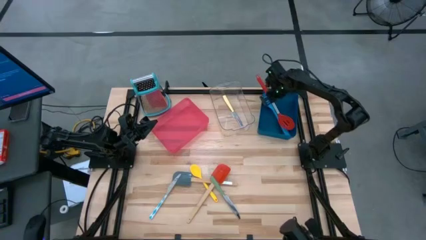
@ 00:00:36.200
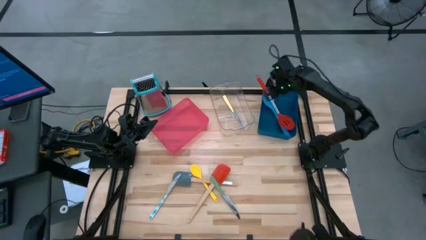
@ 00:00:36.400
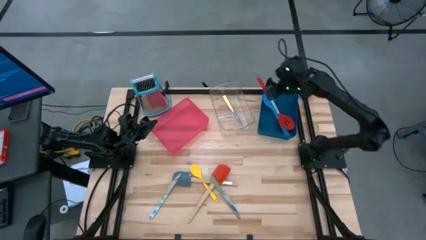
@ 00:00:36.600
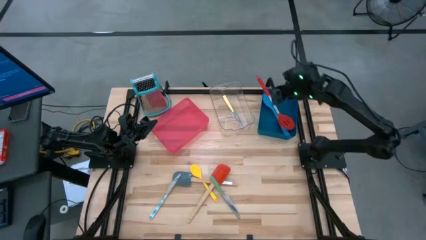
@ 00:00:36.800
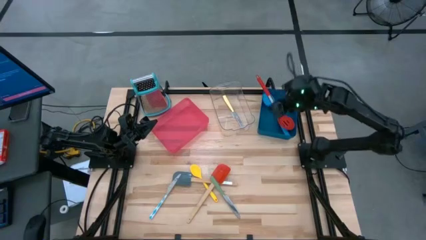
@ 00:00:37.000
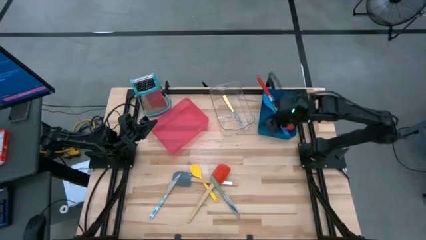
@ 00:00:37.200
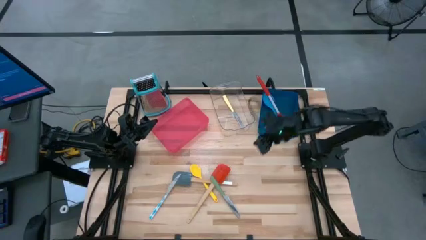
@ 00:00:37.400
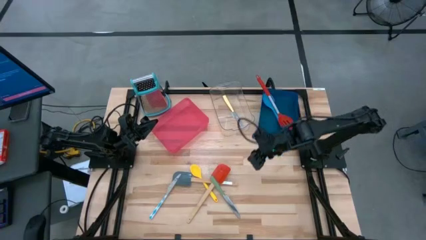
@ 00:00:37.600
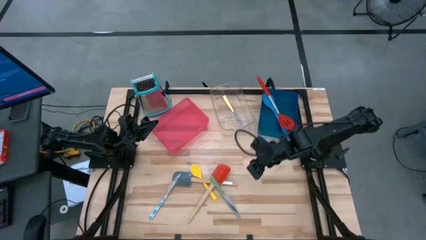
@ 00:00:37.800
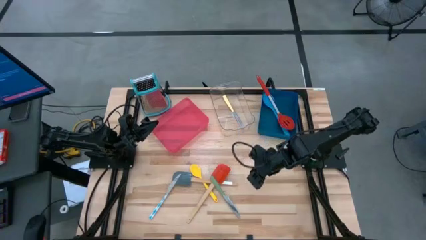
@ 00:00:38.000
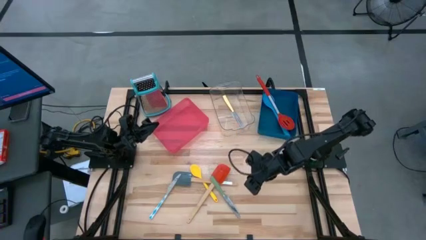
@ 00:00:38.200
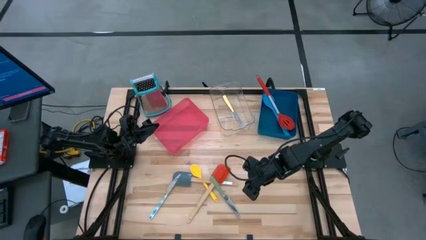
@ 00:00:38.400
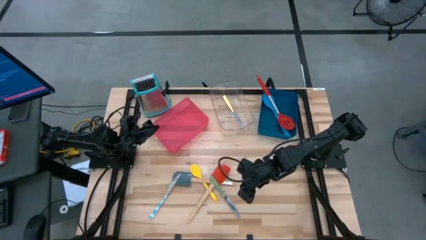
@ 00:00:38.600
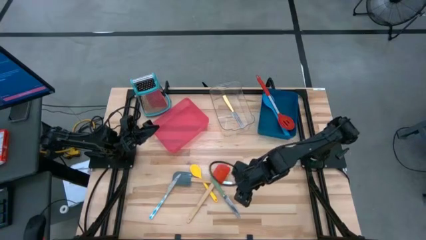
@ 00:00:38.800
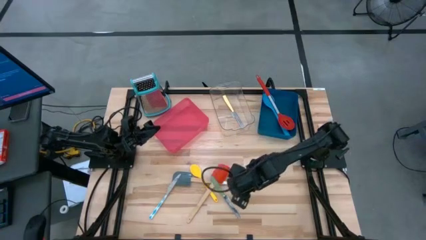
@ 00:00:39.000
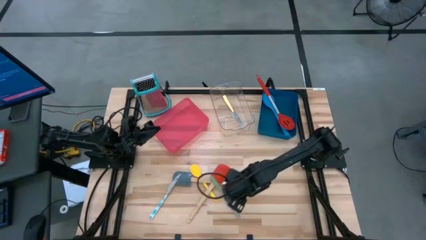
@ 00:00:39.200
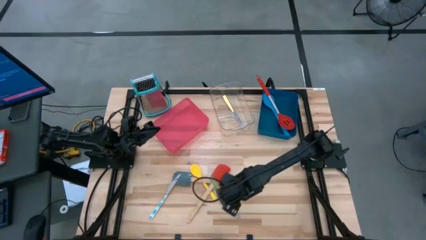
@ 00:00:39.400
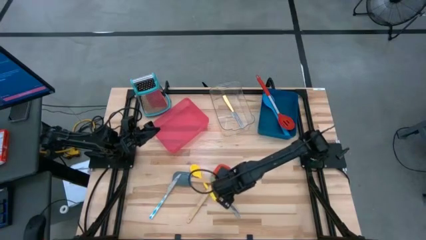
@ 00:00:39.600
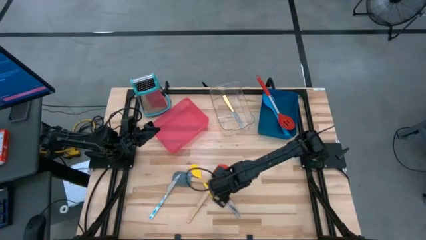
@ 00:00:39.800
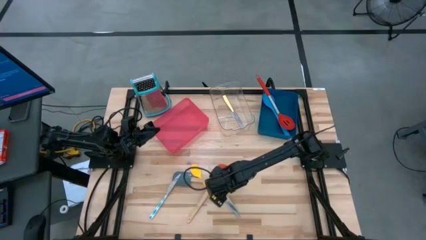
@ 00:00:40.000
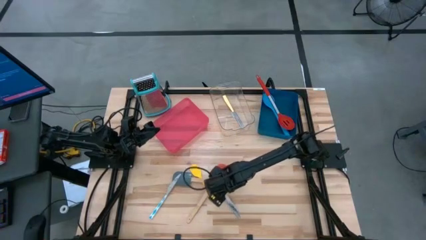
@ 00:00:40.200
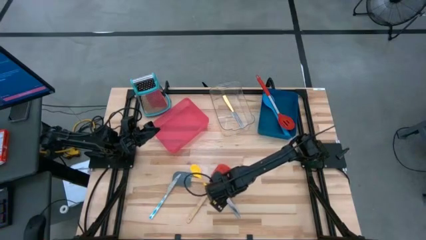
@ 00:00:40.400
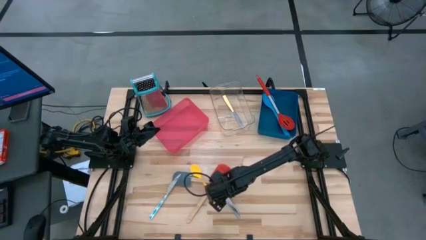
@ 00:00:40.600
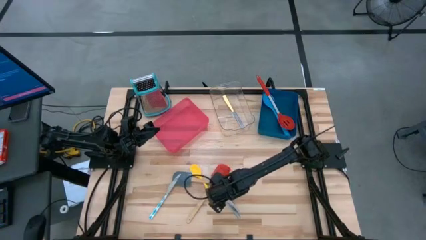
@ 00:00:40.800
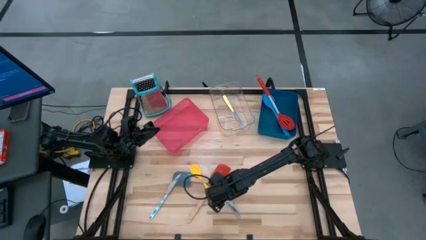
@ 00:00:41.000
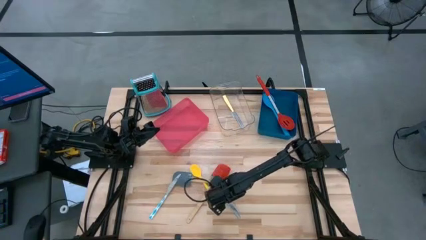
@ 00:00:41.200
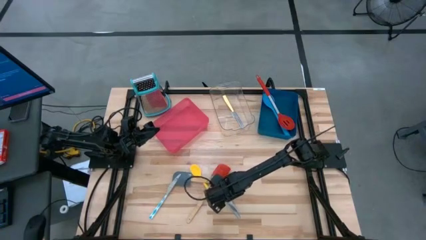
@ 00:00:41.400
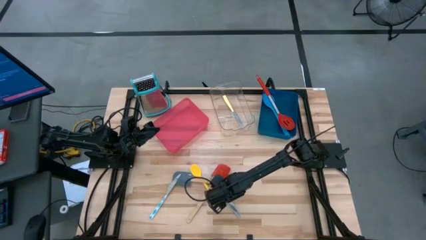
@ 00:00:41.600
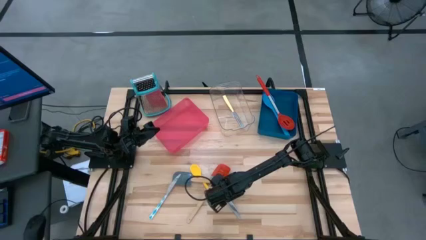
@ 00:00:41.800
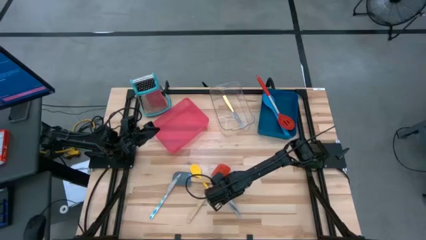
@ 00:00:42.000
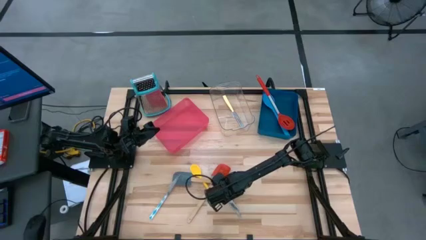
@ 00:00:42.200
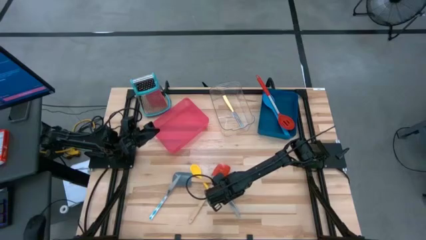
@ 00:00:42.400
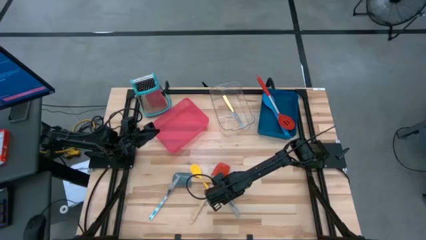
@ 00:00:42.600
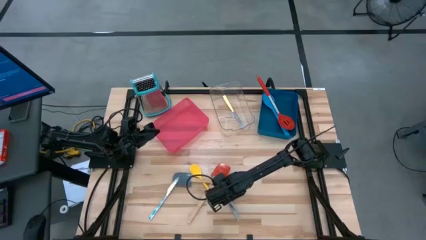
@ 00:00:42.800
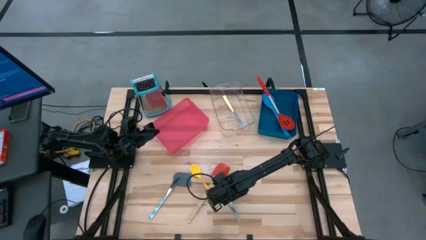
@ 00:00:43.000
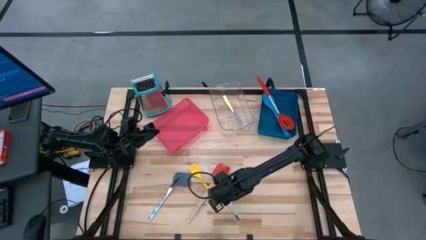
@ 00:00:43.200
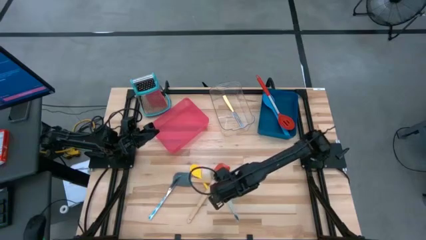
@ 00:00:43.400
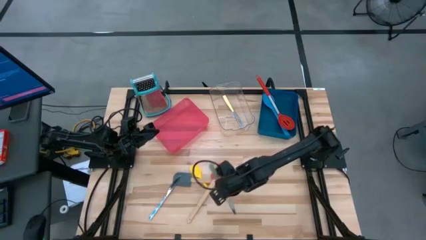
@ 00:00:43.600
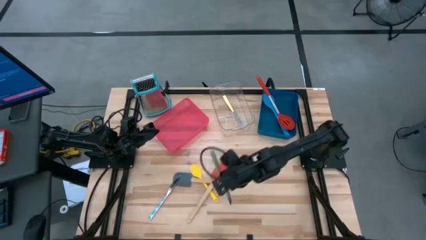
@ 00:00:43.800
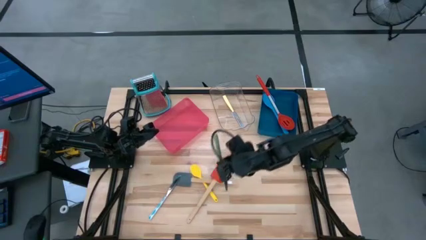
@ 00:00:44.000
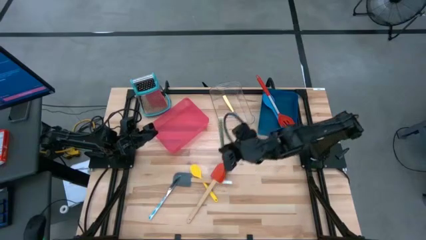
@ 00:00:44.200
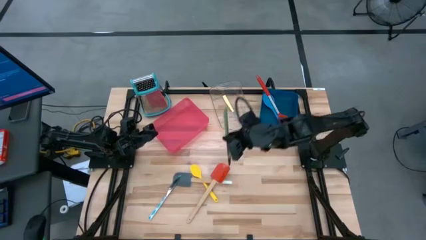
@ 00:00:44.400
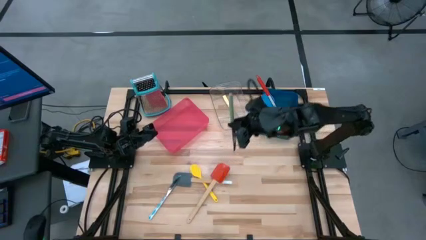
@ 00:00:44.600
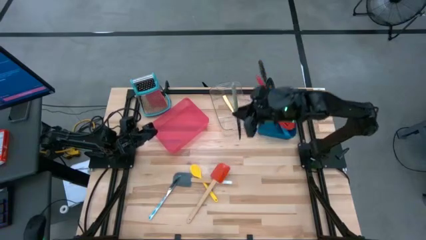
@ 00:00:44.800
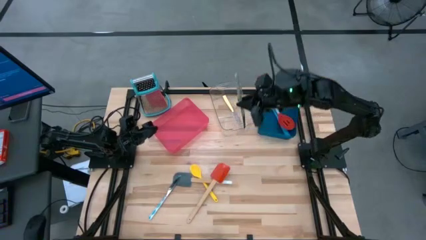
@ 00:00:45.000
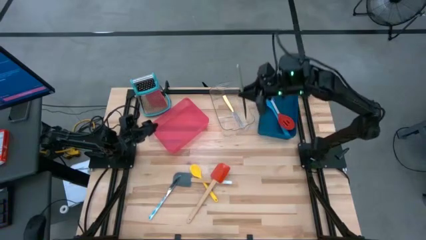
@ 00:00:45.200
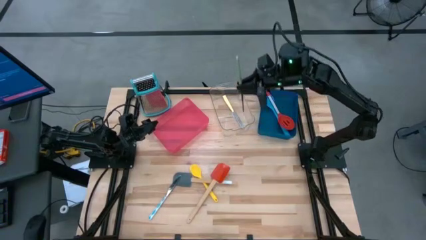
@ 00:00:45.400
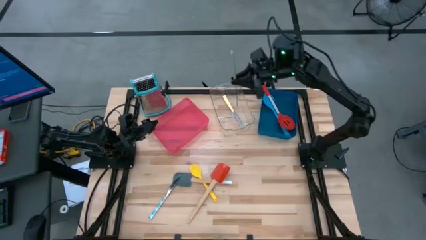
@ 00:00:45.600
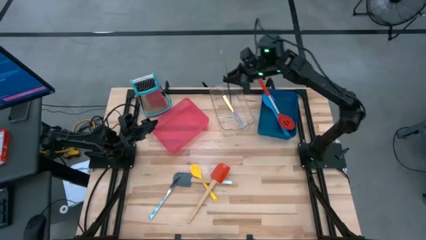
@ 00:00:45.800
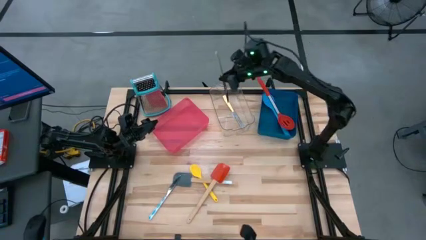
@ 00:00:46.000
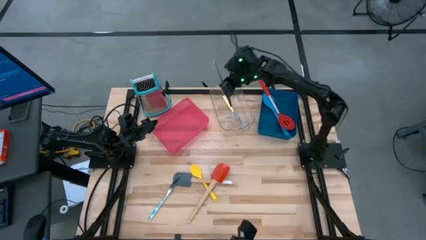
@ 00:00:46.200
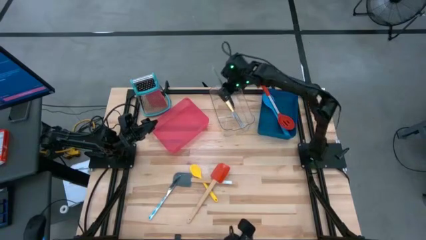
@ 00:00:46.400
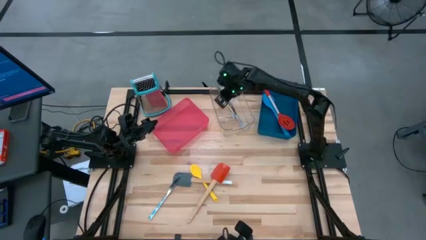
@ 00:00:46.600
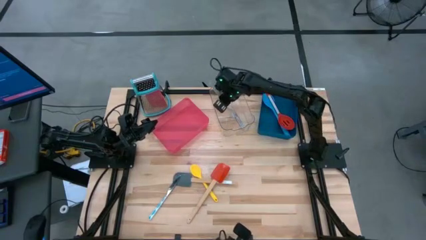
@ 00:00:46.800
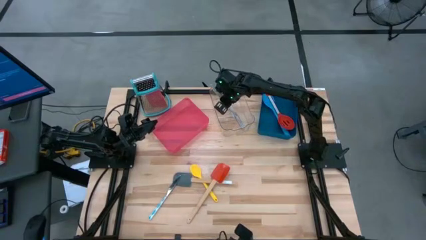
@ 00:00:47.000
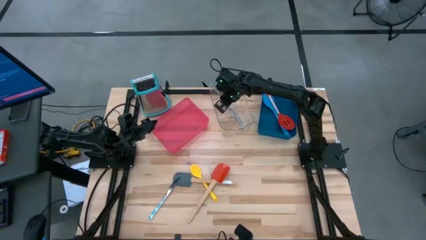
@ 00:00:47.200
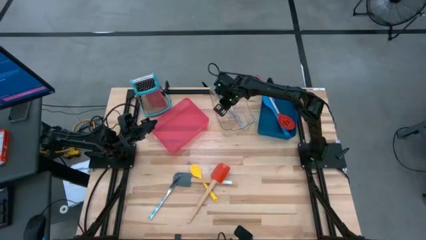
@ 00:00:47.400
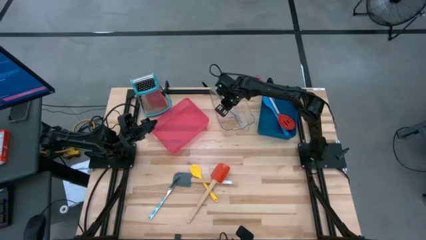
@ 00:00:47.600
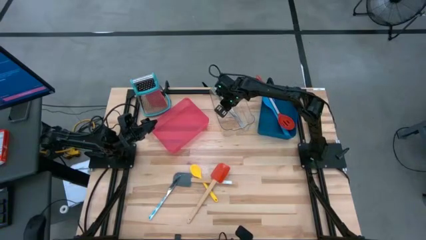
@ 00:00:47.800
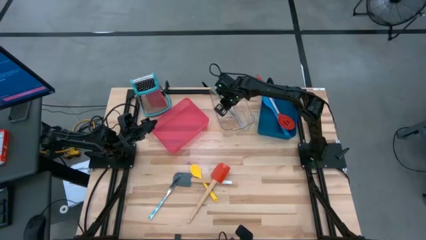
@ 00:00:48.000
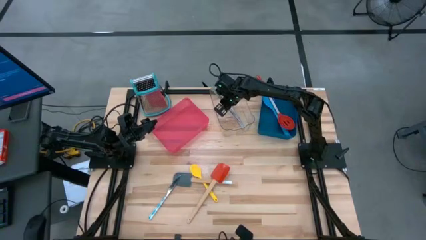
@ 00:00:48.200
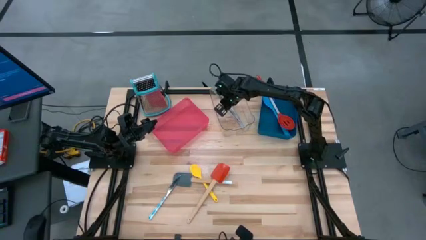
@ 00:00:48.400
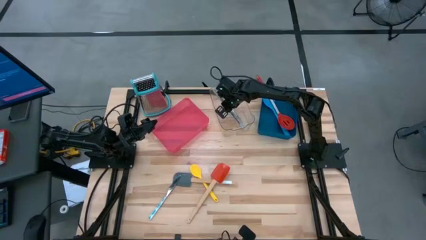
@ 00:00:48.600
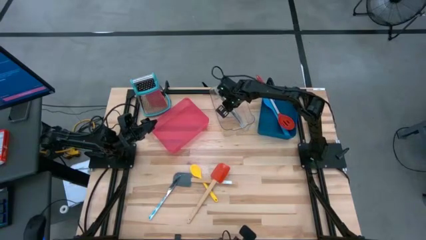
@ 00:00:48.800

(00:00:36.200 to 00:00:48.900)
Task: Pick & Place Kitchen Items
Put the green knife into the transparent bin
